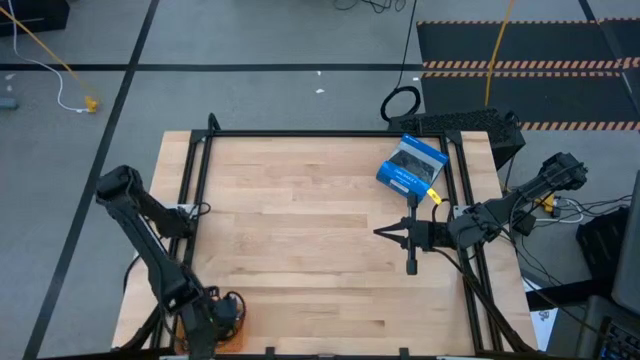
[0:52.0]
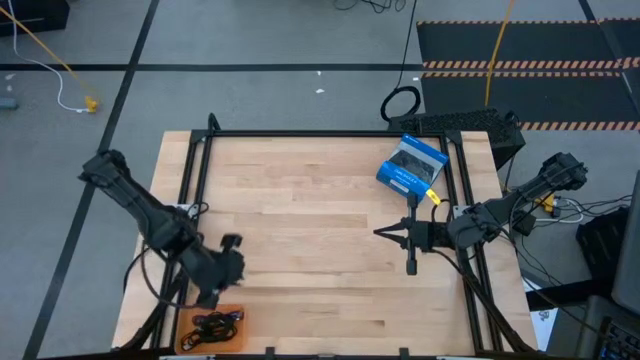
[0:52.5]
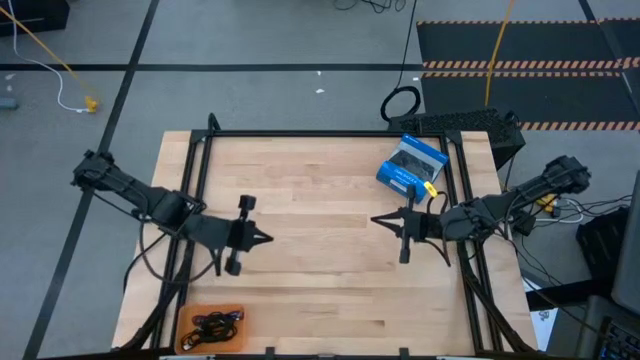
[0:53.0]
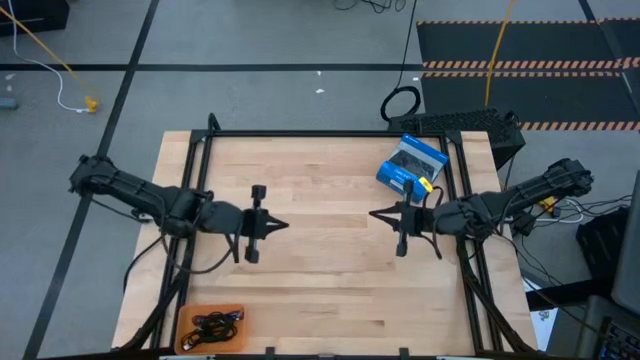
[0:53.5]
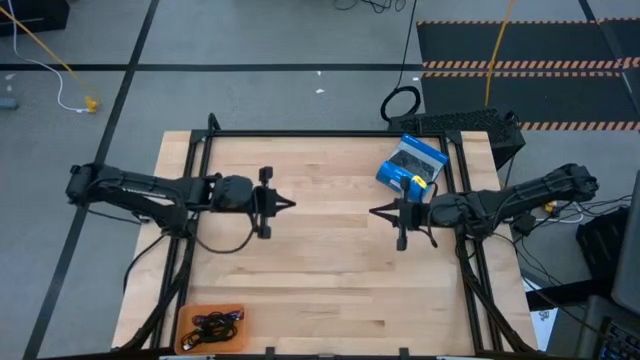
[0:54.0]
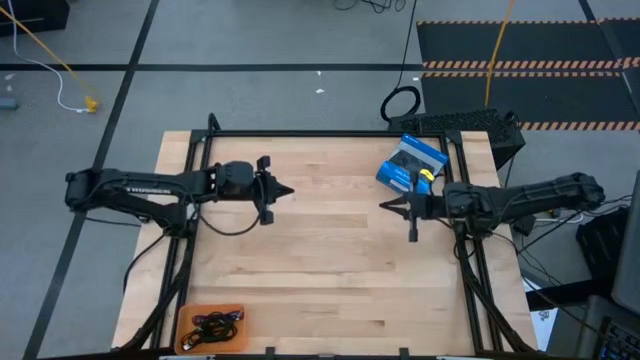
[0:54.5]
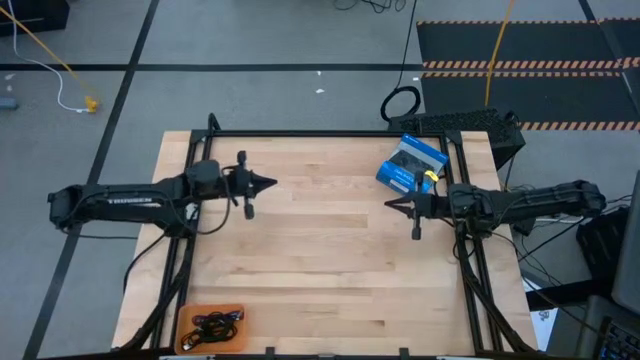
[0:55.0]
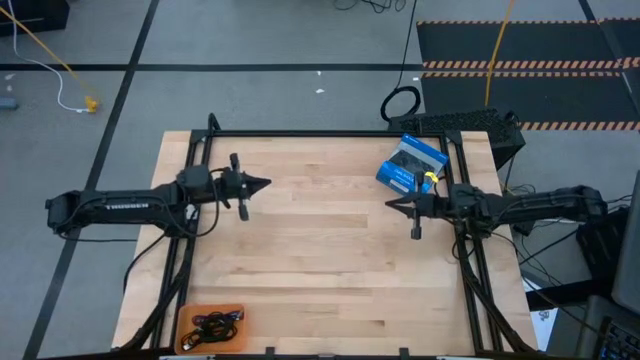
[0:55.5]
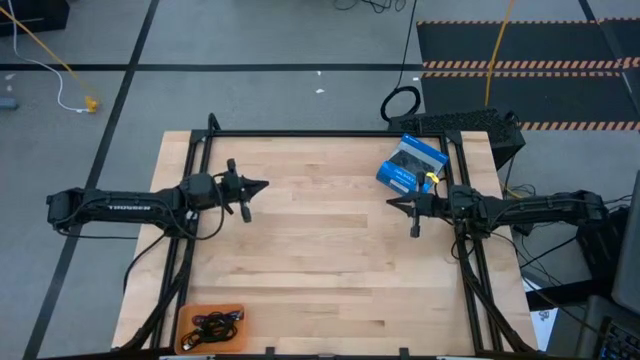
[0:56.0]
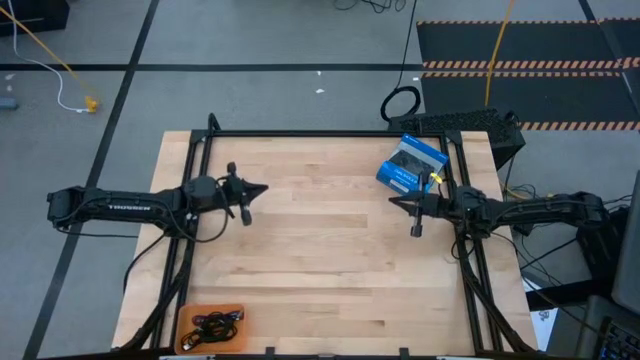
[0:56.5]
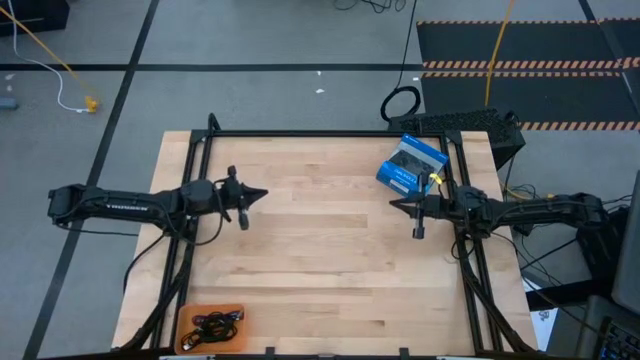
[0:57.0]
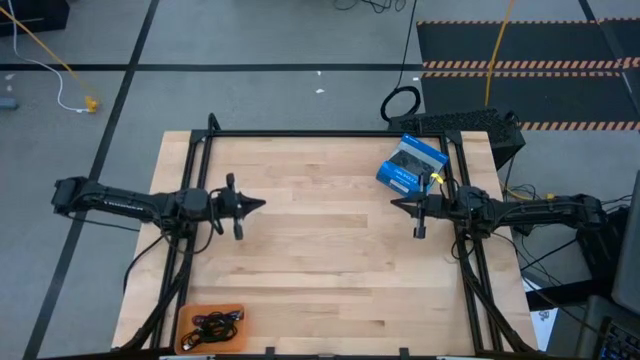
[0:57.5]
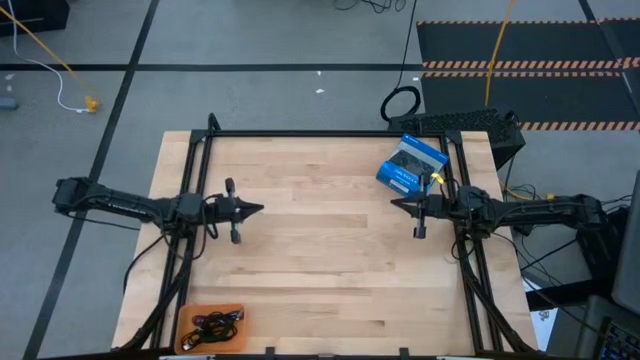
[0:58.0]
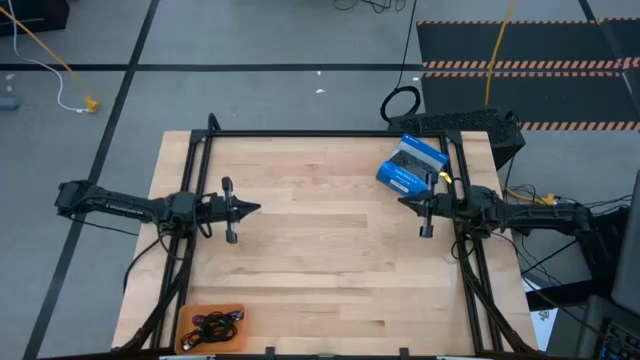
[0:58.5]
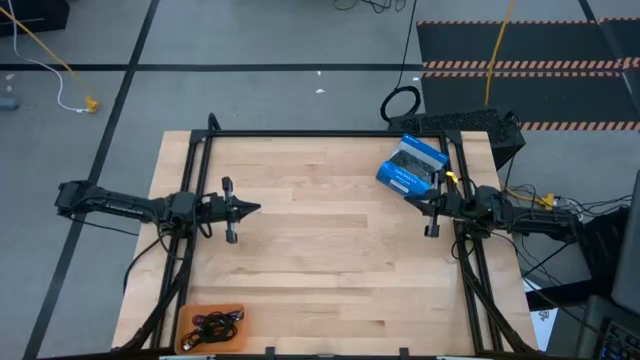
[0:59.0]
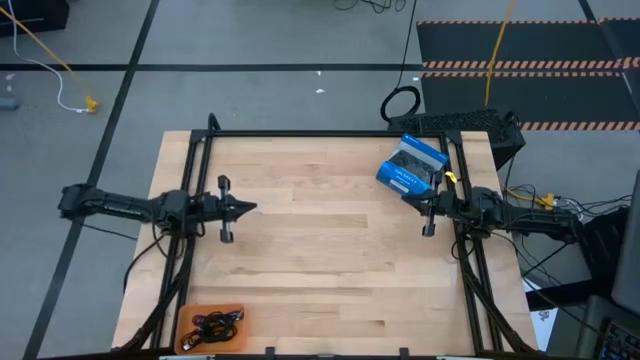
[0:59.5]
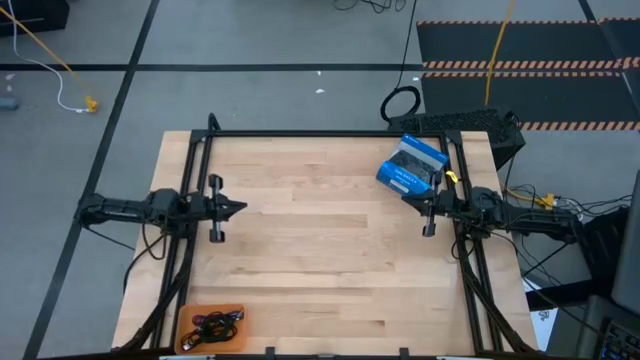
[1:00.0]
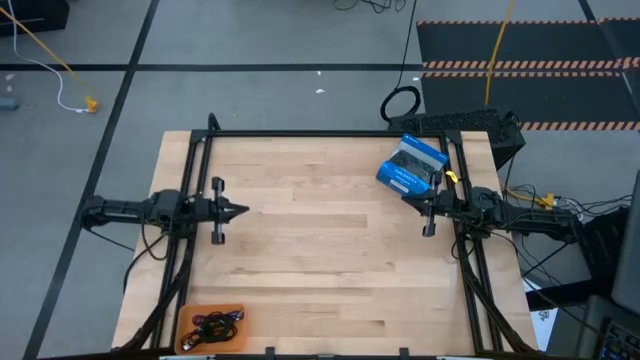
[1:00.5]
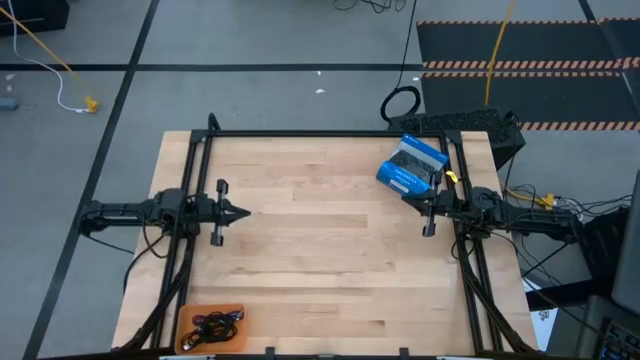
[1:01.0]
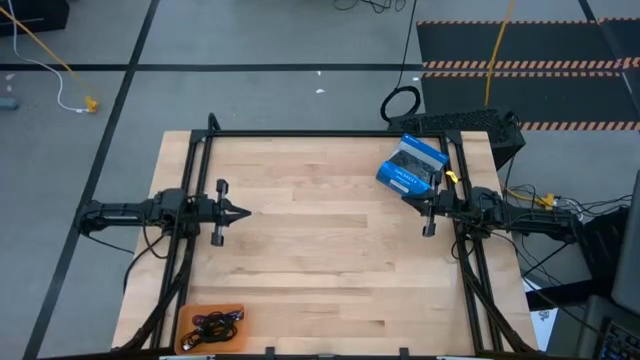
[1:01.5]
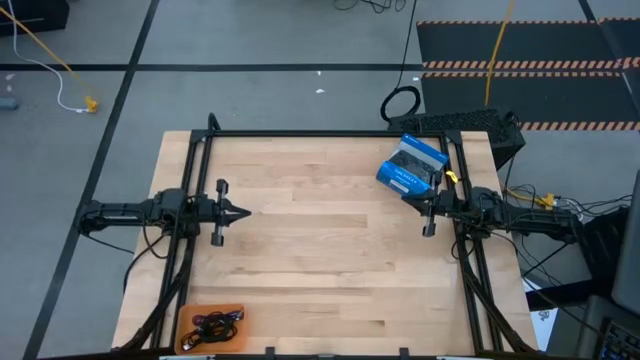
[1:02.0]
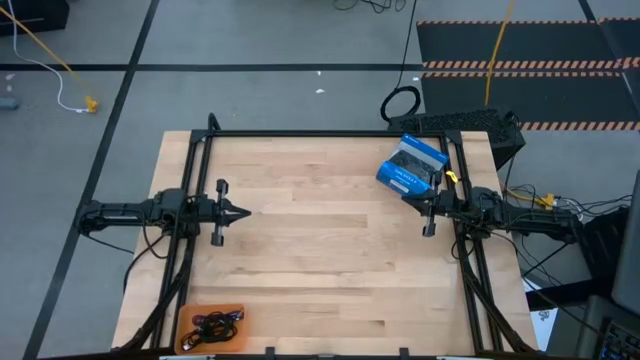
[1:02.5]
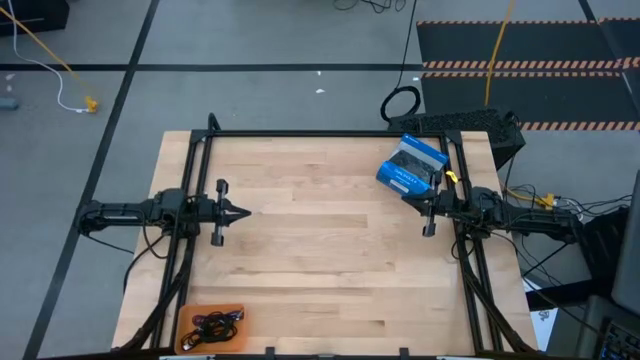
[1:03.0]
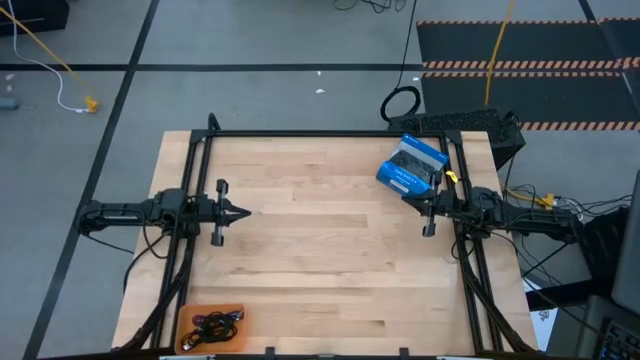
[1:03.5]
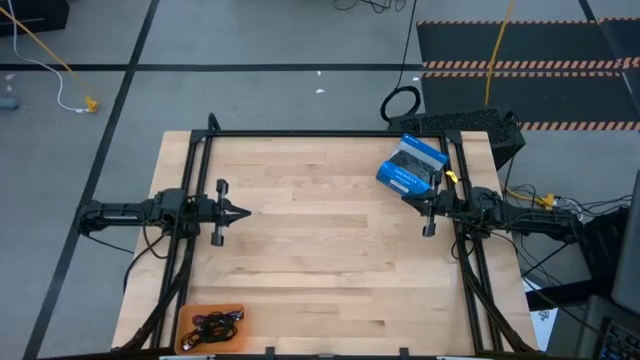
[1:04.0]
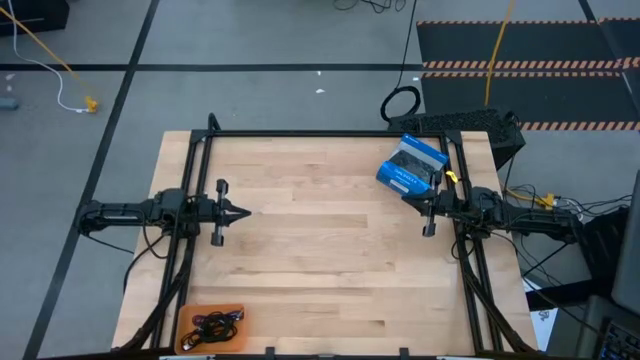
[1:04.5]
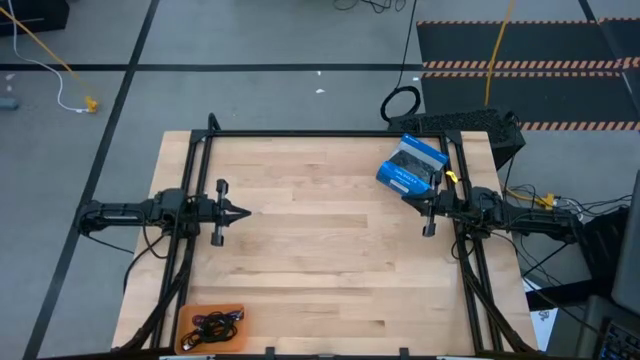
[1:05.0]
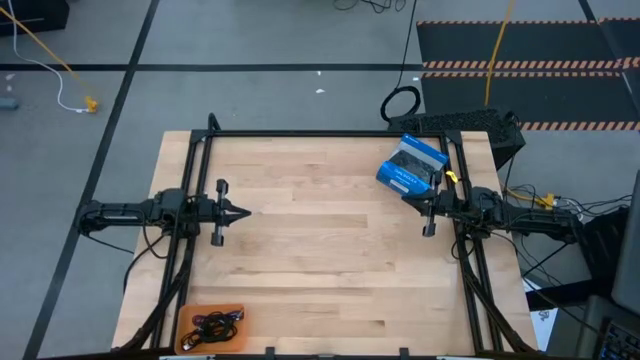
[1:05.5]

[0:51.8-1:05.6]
Task: Pick and place USB-C Cables
Return to Home Position

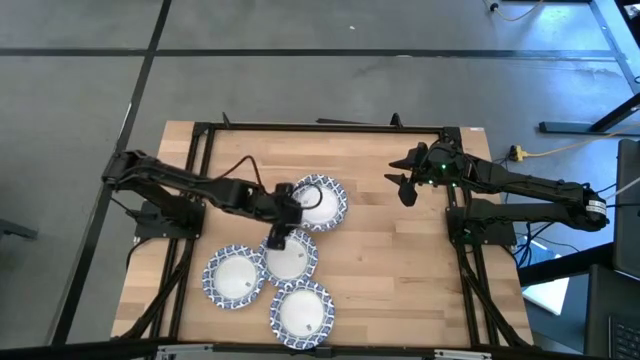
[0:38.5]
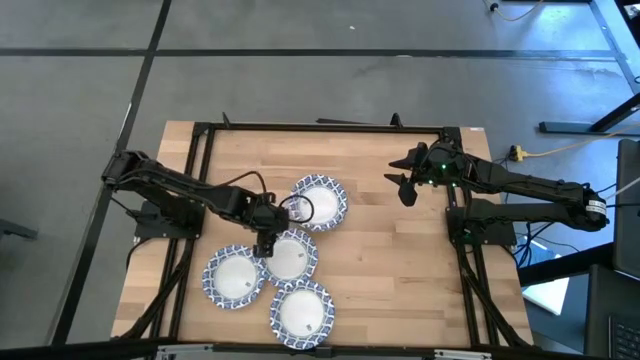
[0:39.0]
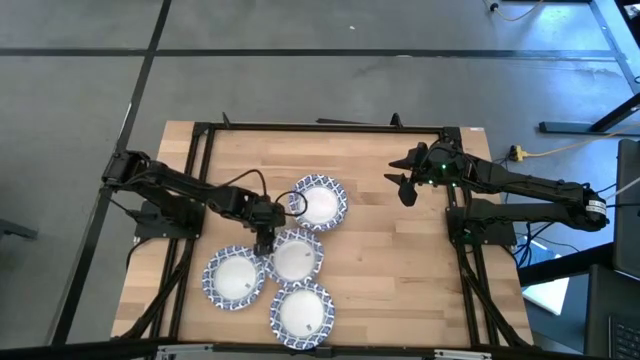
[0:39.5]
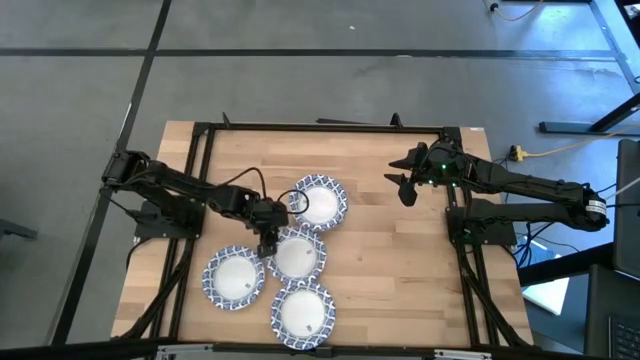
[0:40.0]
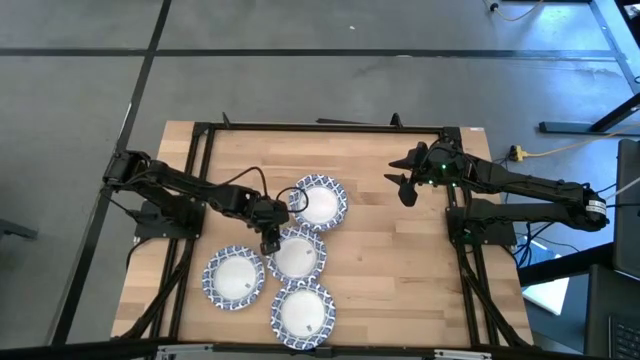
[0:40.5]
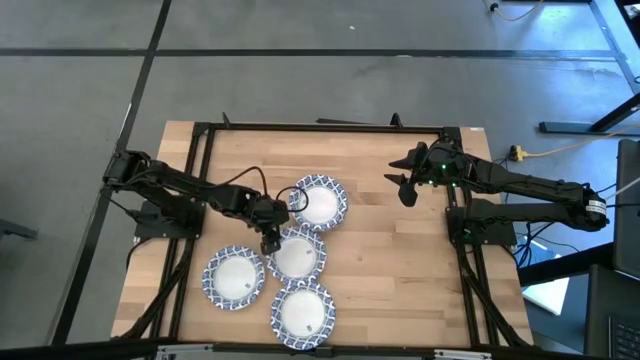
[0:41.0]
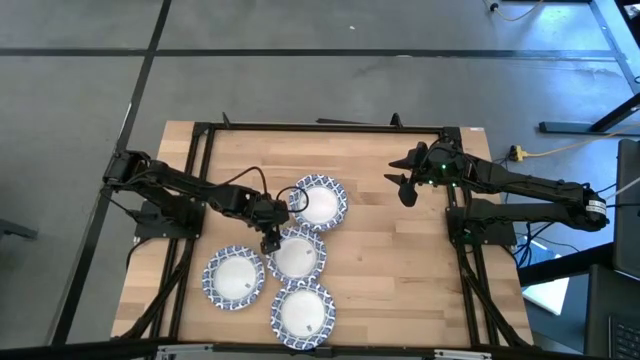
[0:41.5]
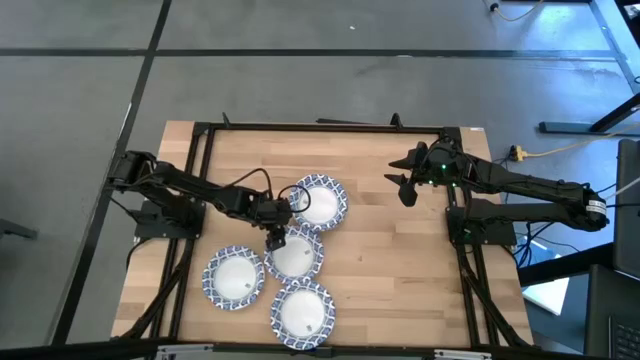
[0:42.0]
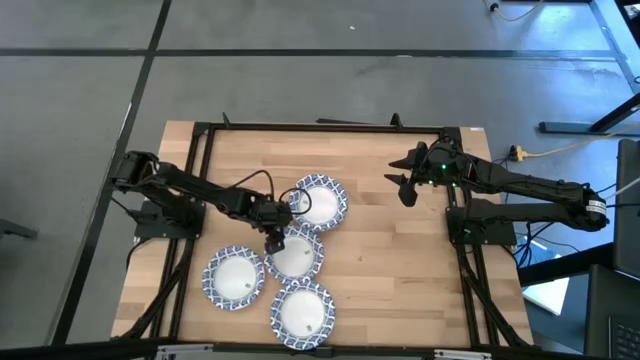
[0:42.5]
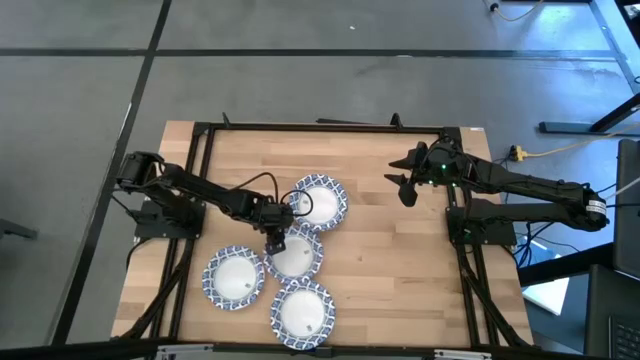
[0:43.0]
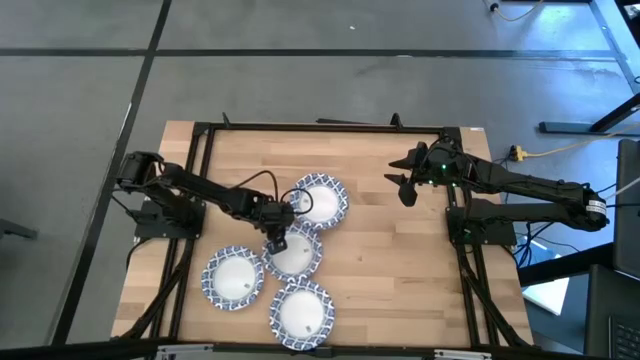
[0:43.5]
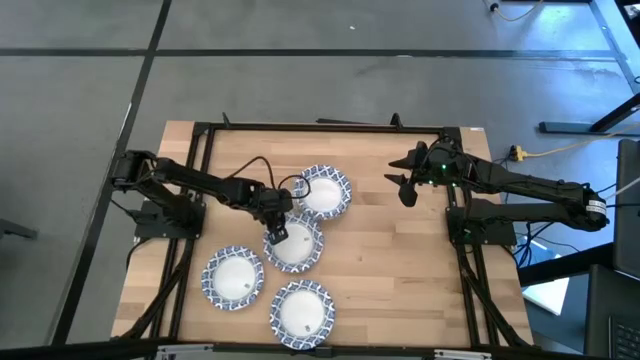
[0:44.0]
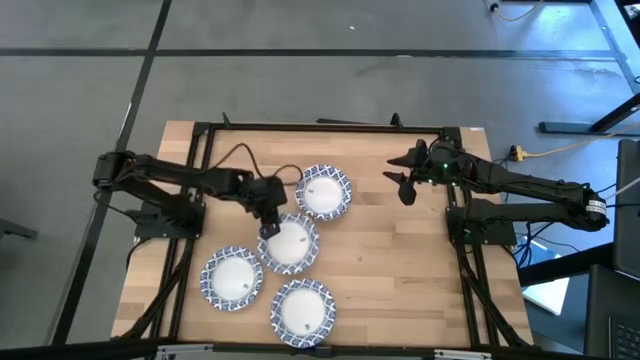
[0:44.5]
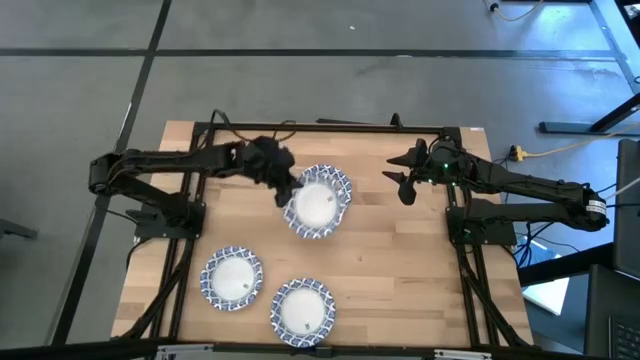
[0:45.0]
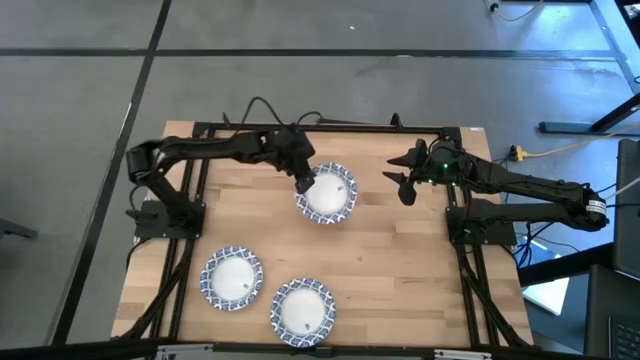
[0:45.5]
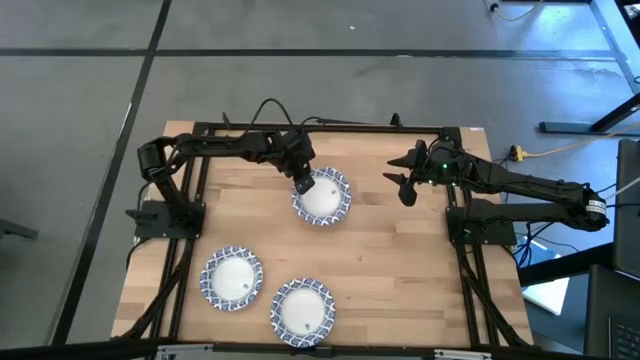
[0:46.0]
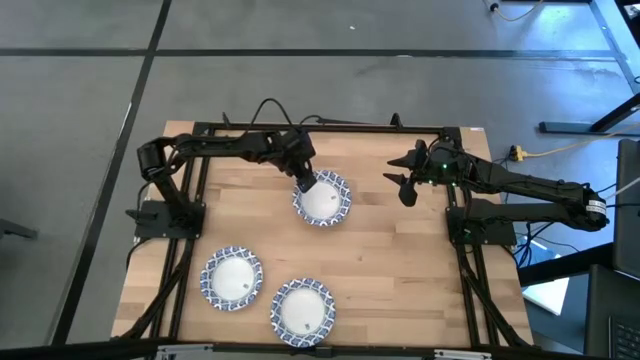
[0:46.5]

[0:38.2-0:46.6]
Task: Nest bowls inside each other
Stack the blue patterned bowl on the stacked blue patterned bowls
